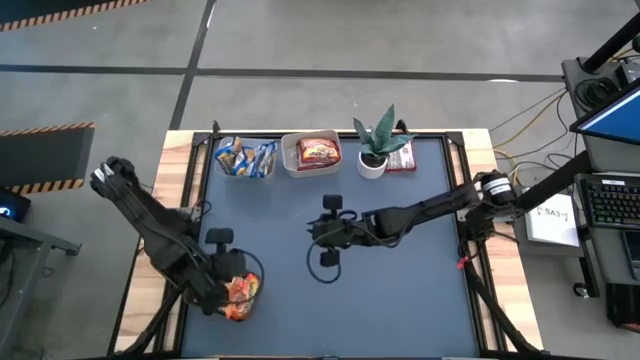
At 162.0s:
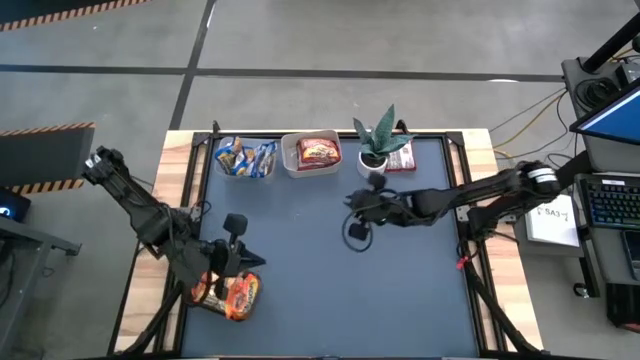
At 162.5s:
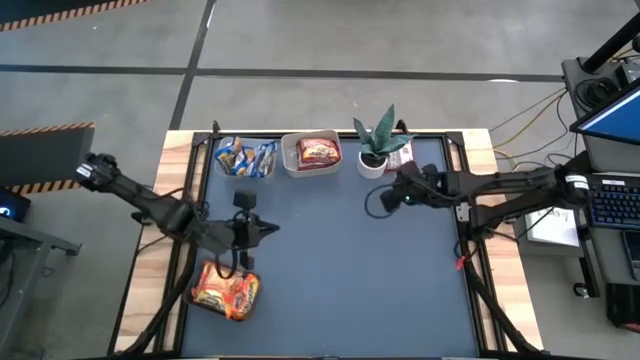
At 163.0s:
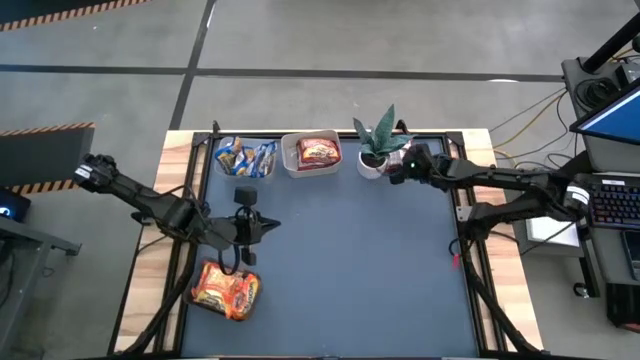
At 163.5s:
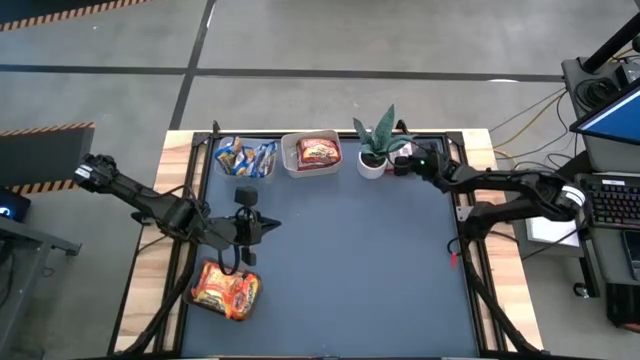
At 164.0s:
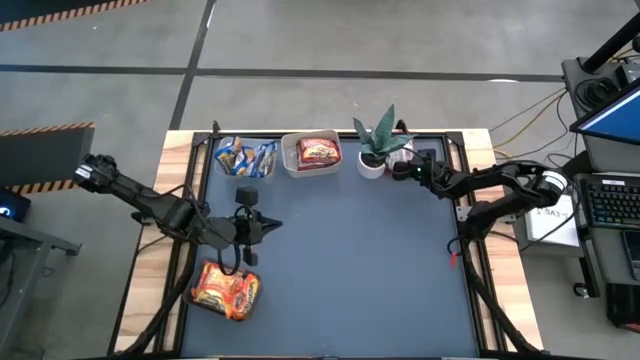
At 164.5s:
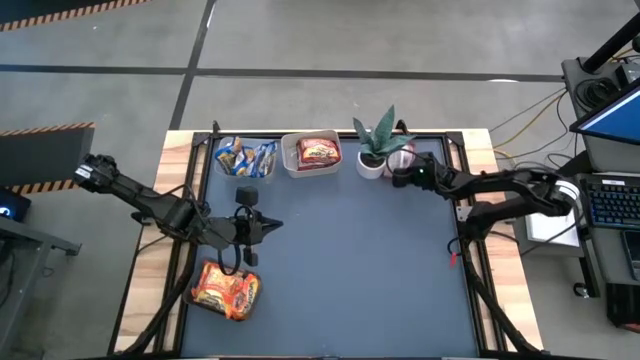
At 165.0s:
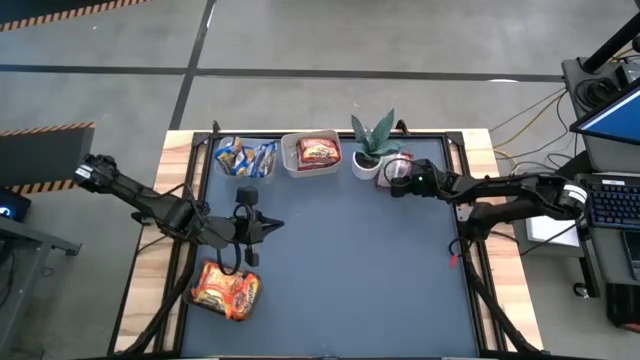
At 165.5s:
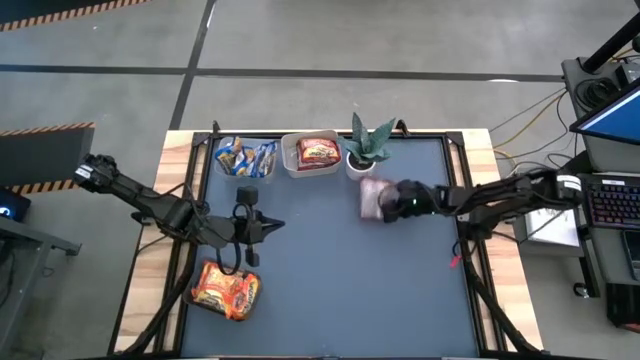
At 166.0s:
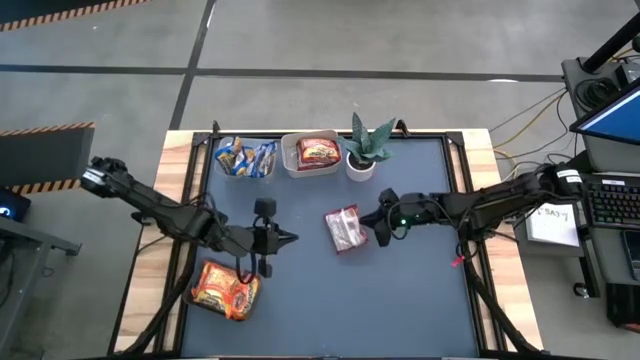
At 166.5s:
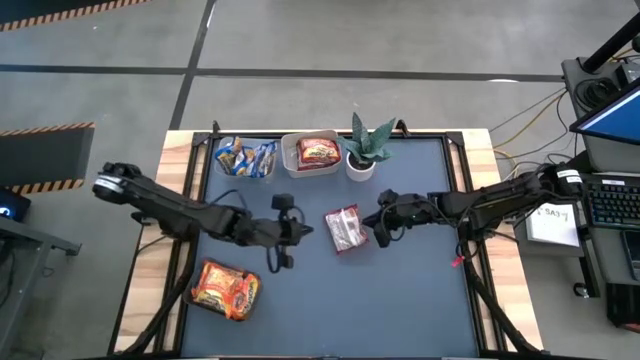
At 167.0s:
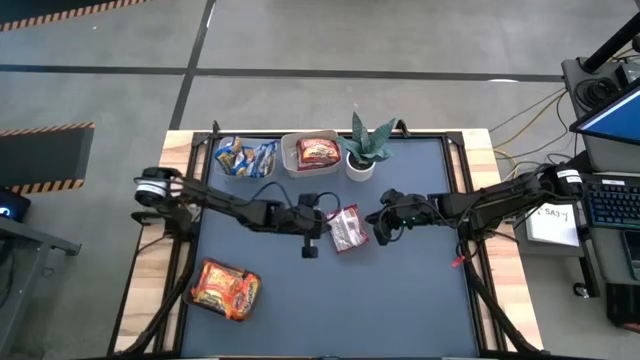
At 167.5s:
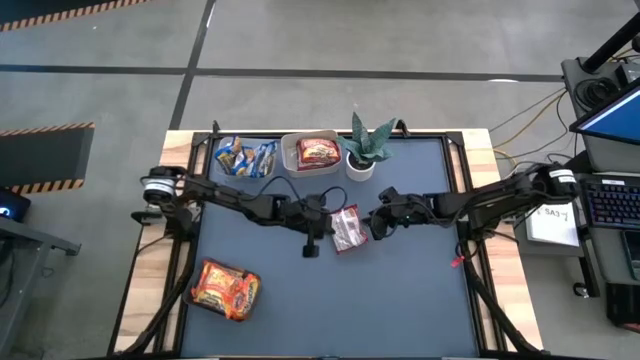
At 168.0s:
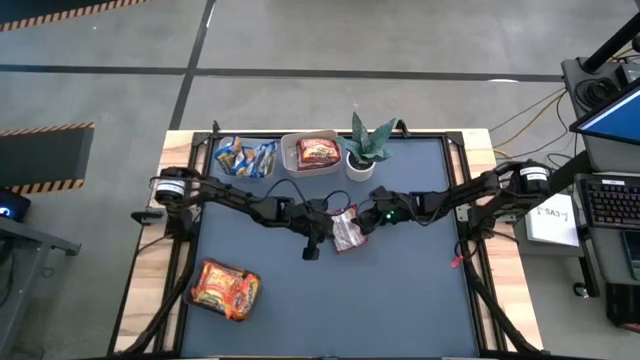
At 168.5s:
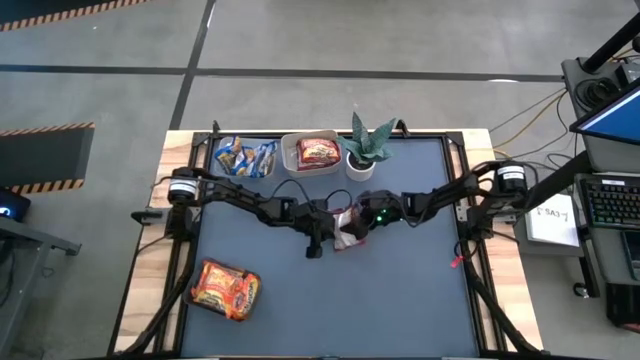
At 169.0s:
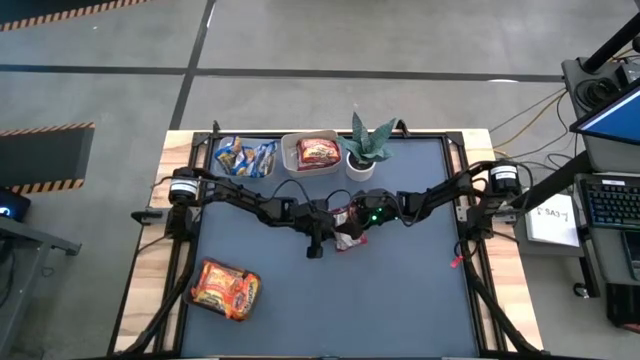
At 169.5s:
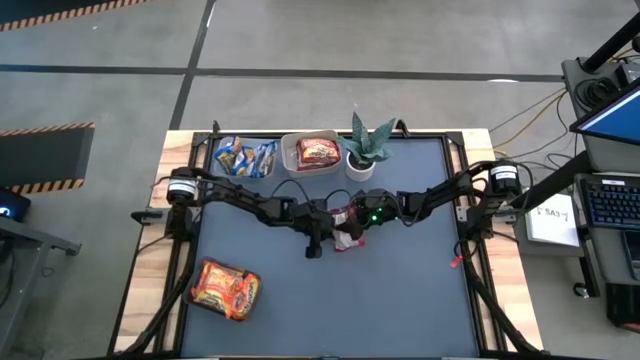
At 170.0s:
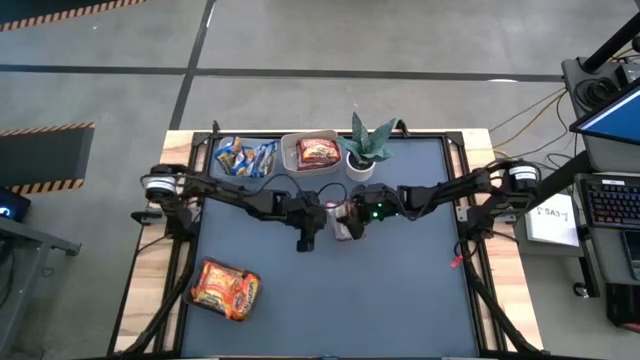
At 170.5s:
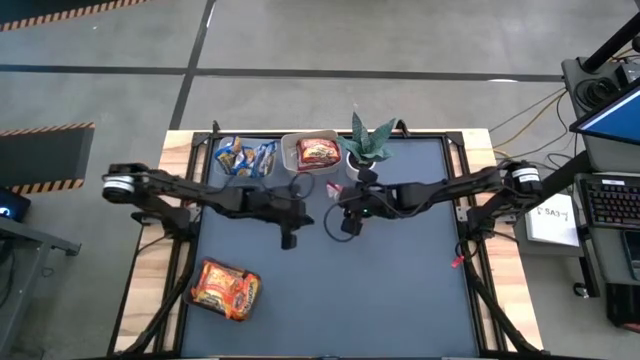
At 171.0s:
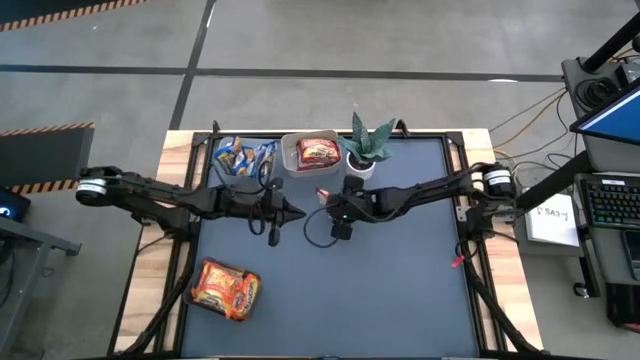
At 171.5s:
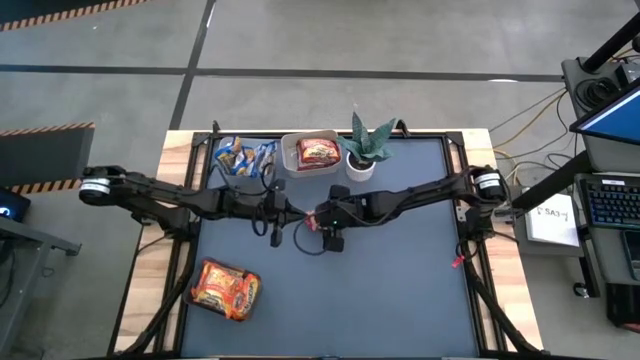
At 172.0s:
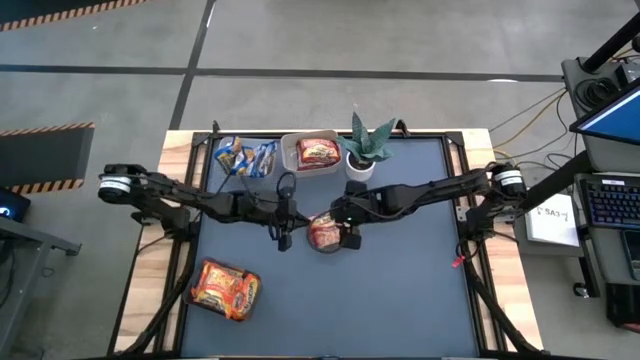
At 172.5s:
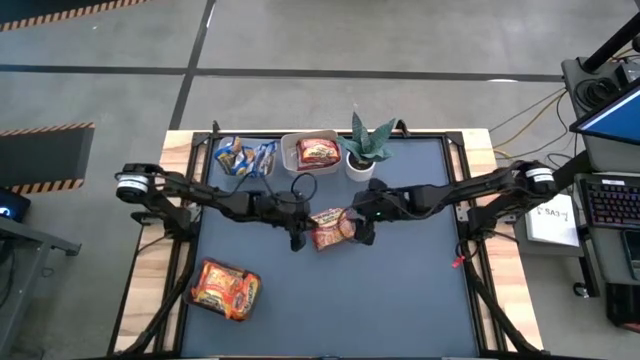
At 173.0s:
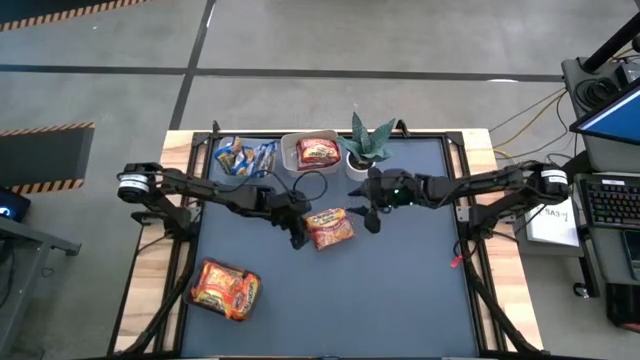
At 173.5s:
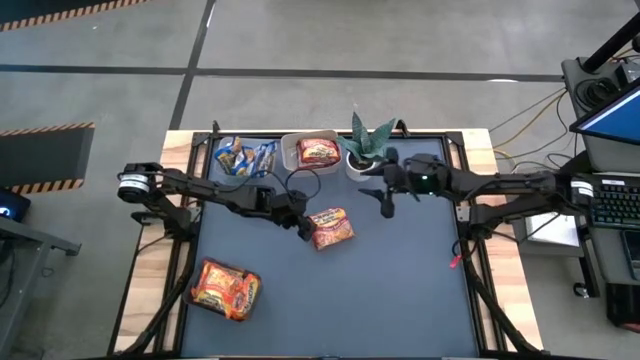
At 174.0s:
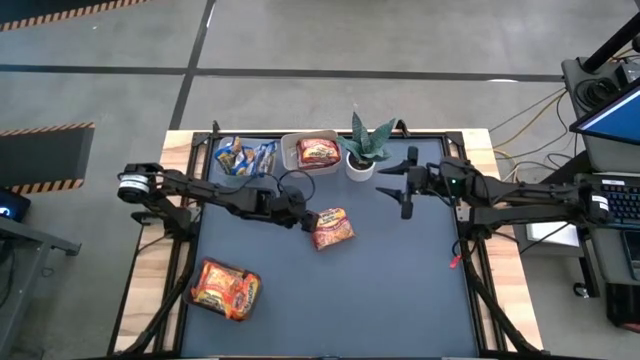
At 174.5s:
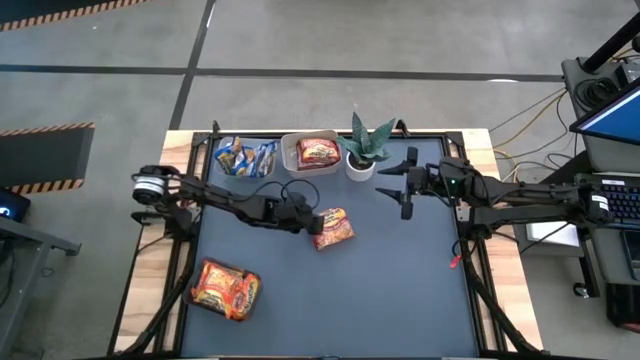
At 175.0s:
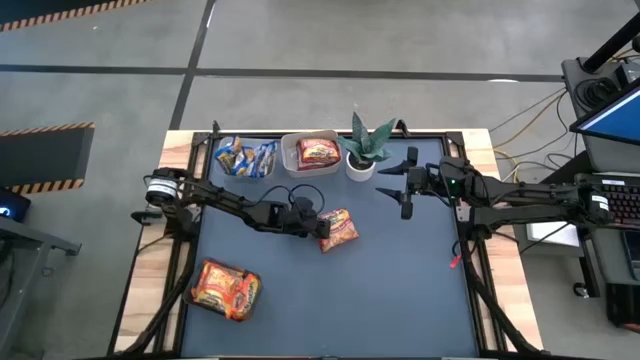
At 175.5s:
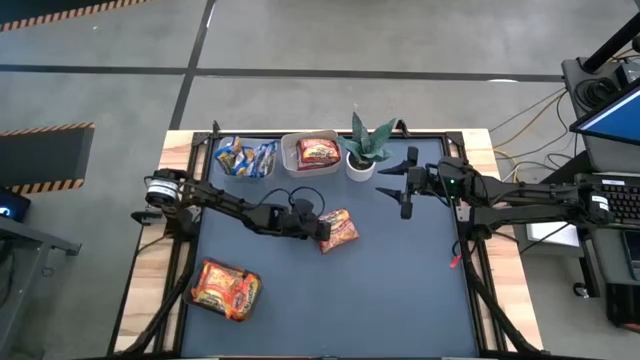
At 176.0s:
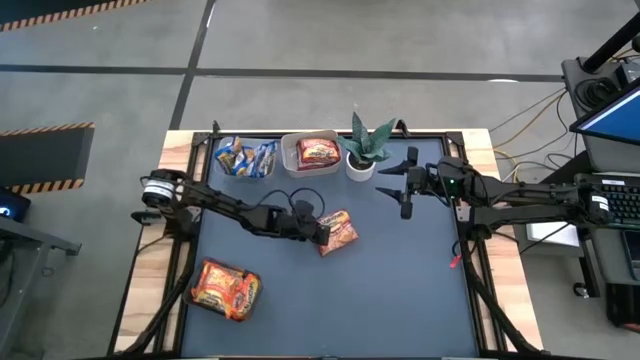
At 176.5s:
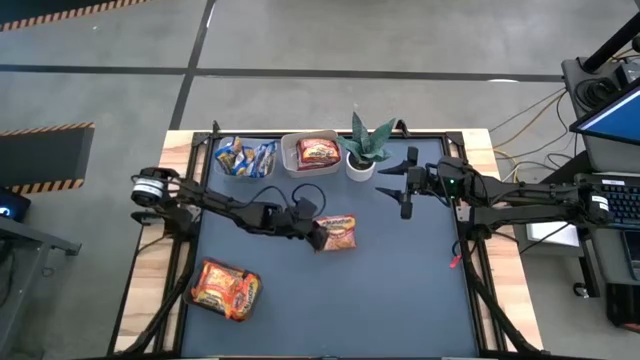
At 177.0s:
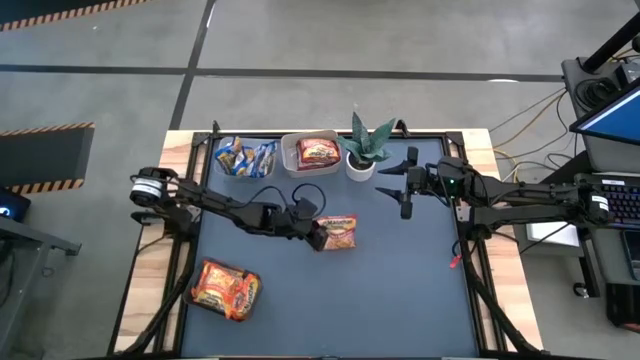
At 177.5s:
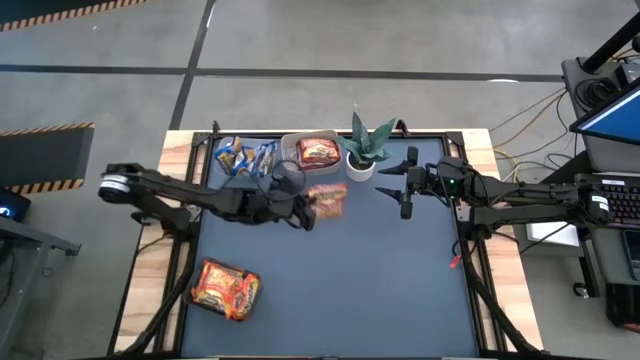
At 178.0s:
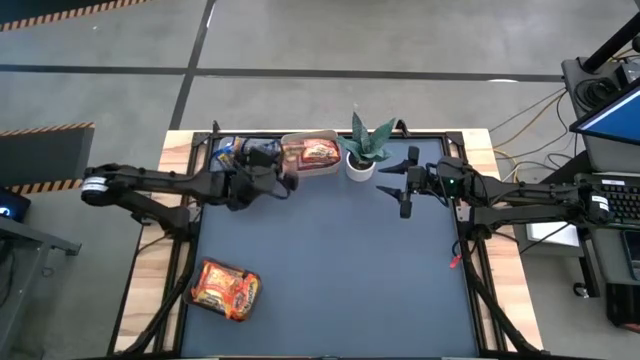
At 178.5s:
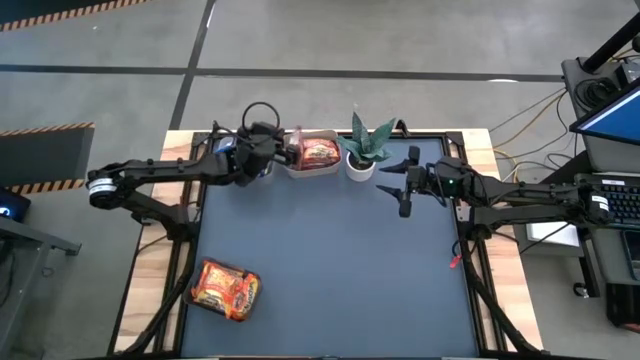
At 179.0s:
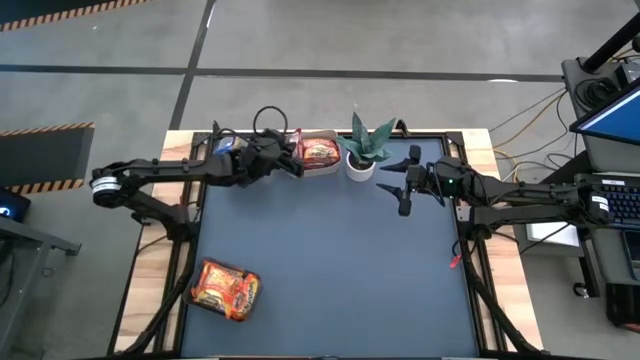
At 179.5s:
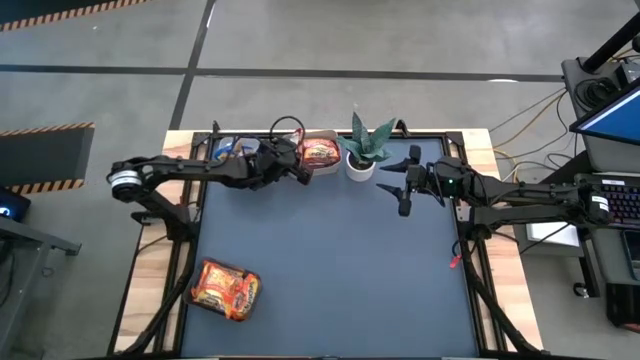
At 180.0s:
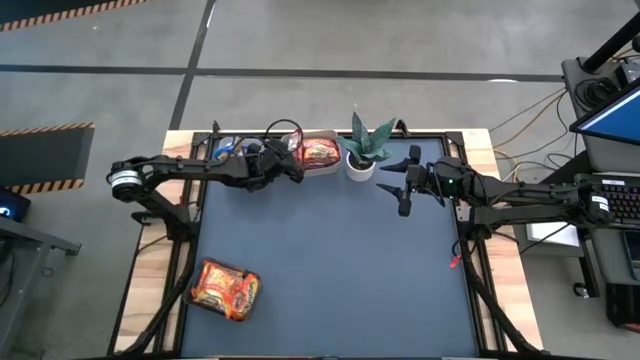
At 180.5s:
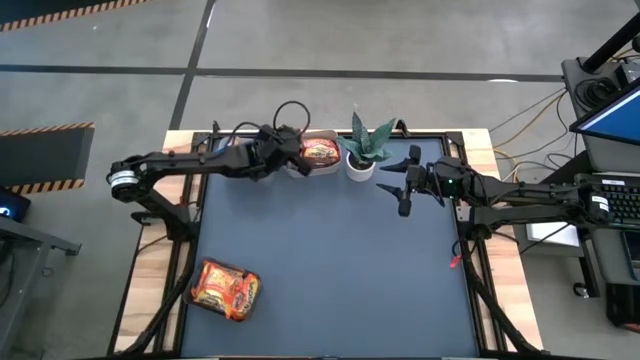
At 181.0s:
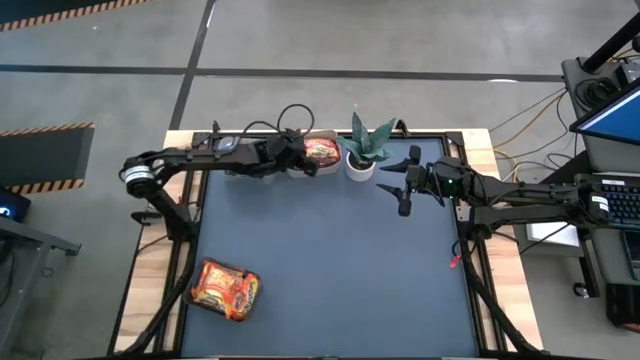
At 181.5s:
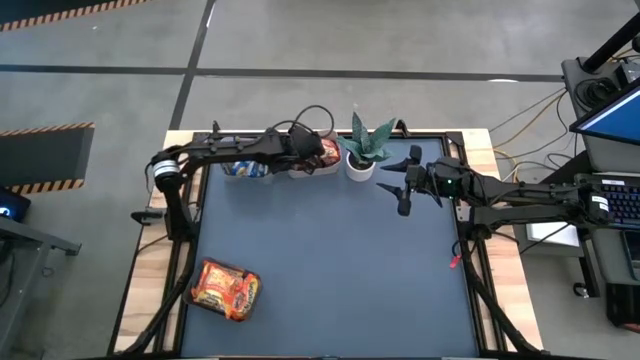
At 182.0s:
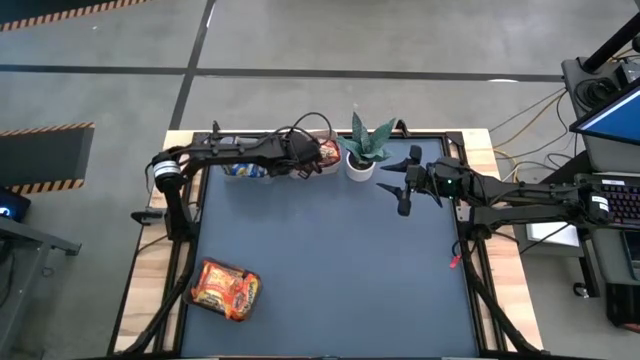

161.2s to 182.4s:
Task: Sort Maruchan noodles
Put the red noodle pack into the gray bin

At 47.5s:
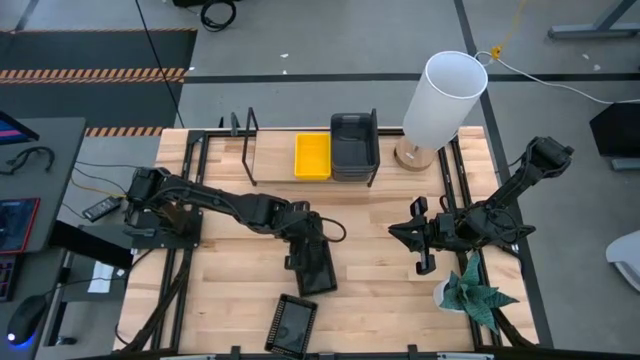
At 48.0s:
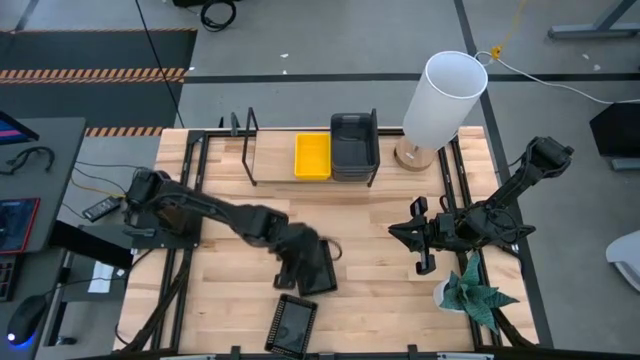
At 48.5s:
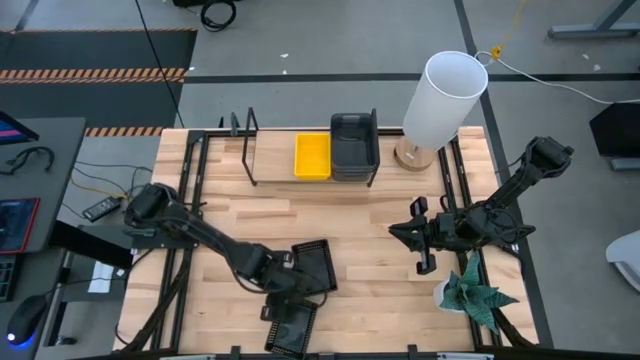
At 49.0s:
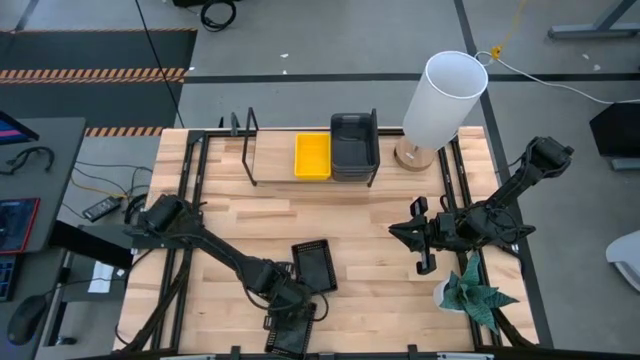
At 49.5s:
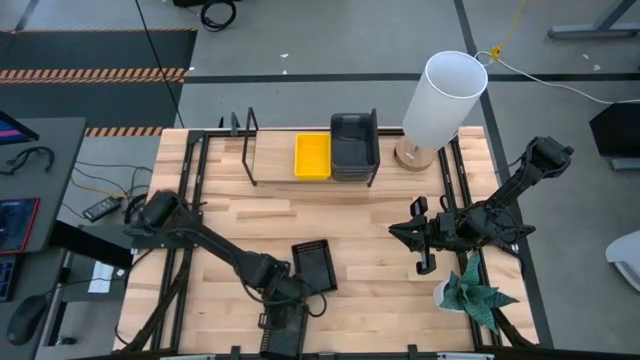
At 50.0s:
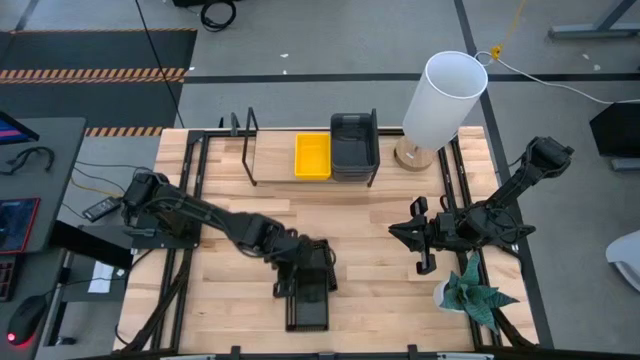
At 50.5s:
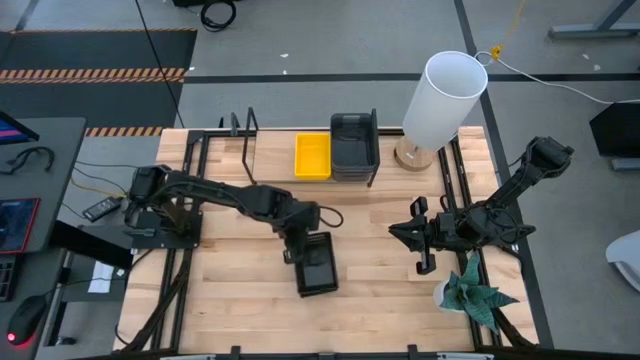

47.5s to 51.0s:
Task: Stack baskets on shelf by color
Stack the bottom black bin into the top black bin
